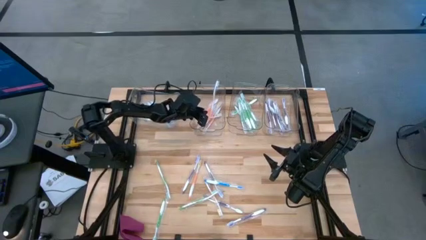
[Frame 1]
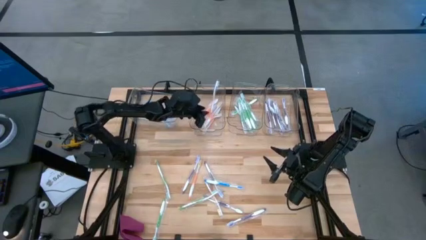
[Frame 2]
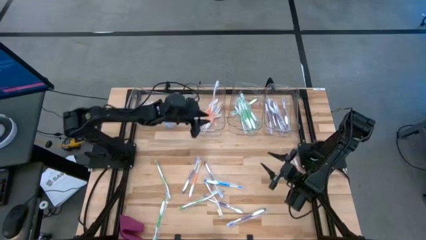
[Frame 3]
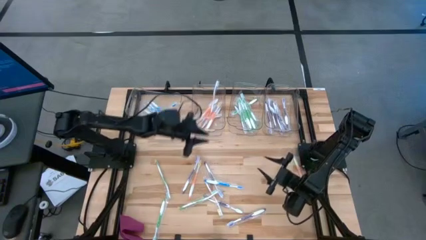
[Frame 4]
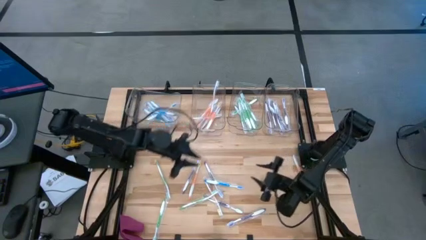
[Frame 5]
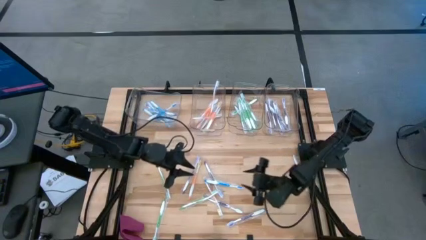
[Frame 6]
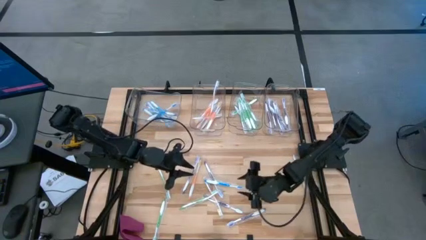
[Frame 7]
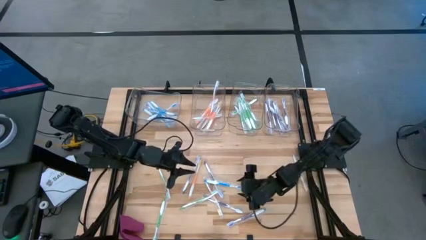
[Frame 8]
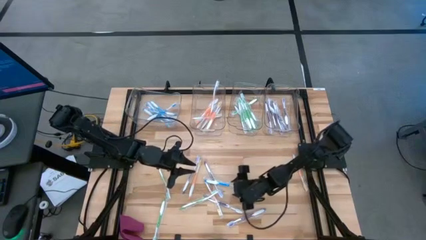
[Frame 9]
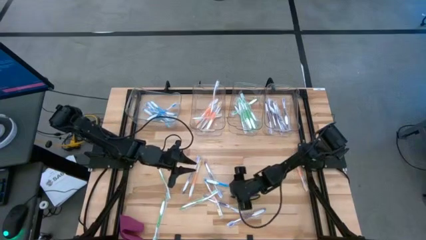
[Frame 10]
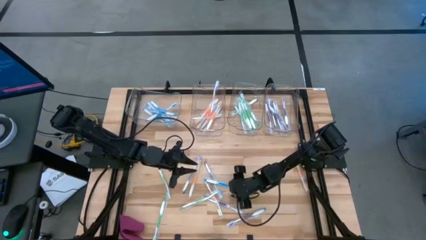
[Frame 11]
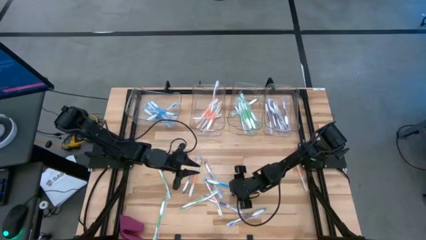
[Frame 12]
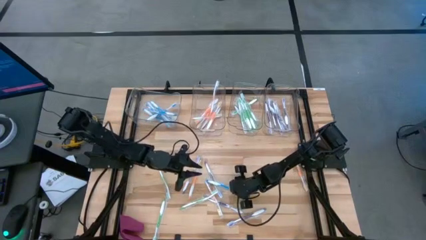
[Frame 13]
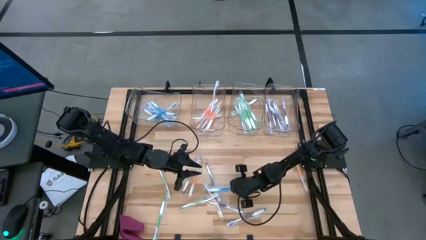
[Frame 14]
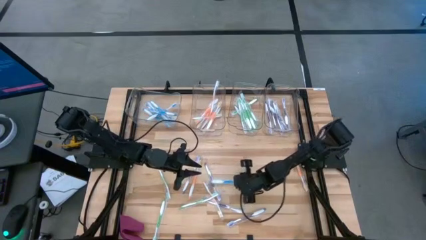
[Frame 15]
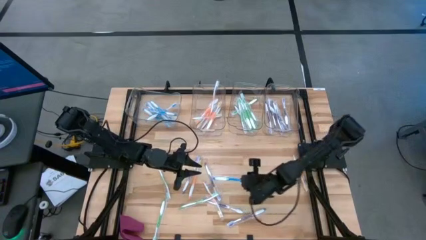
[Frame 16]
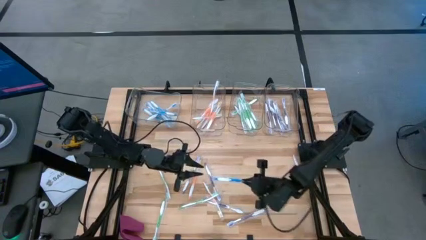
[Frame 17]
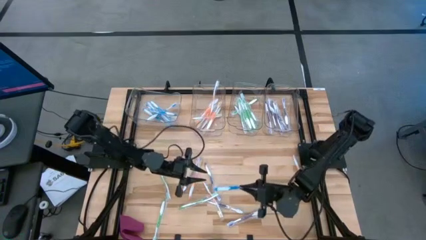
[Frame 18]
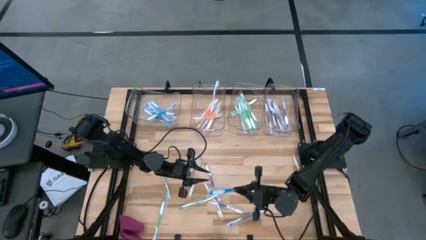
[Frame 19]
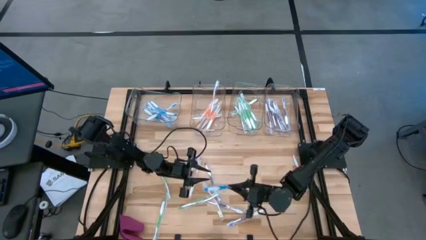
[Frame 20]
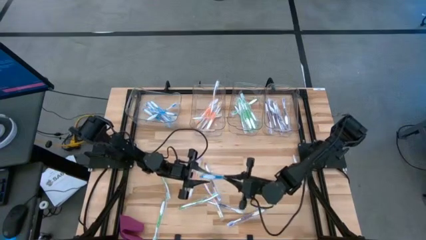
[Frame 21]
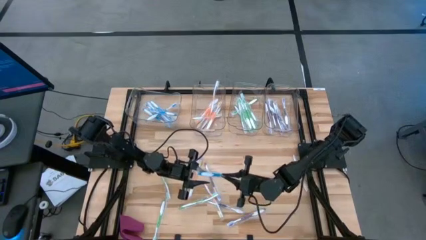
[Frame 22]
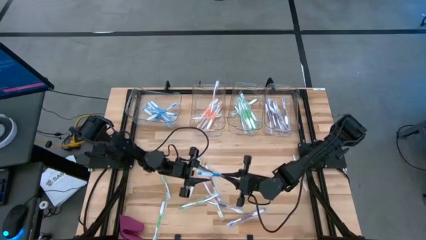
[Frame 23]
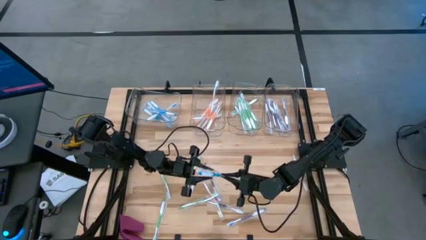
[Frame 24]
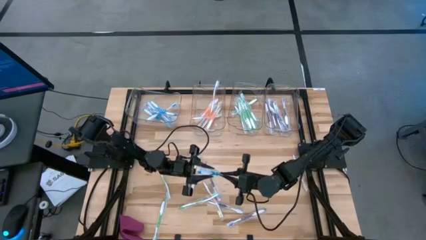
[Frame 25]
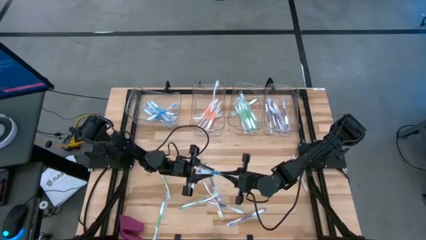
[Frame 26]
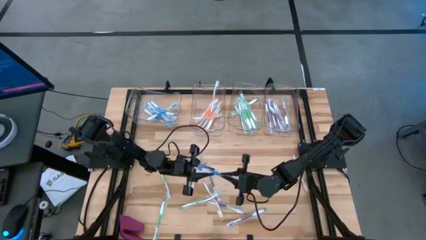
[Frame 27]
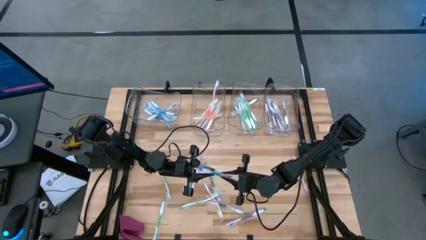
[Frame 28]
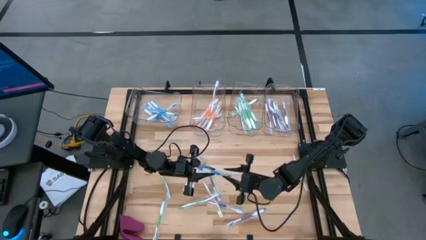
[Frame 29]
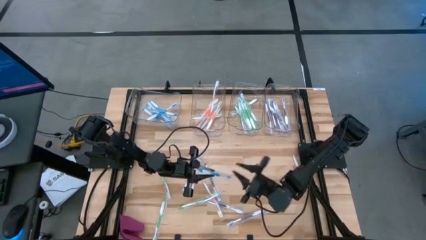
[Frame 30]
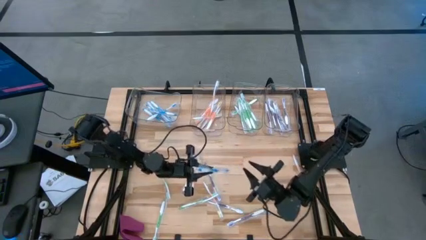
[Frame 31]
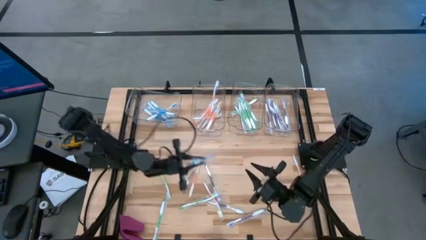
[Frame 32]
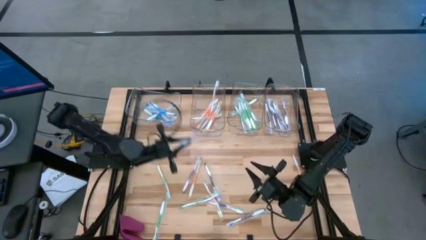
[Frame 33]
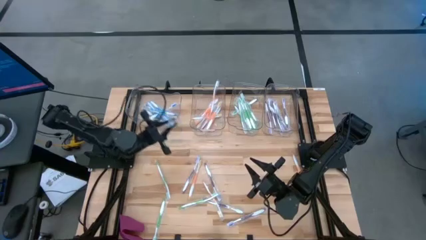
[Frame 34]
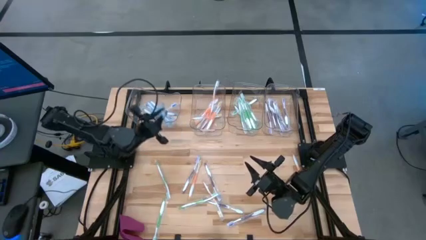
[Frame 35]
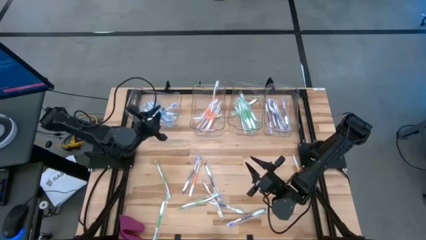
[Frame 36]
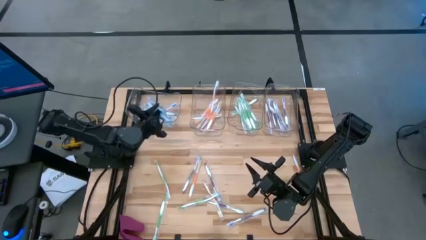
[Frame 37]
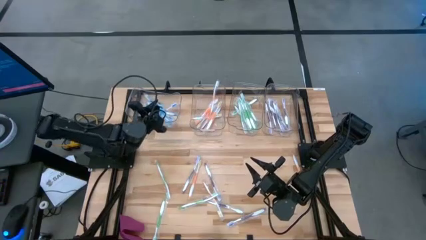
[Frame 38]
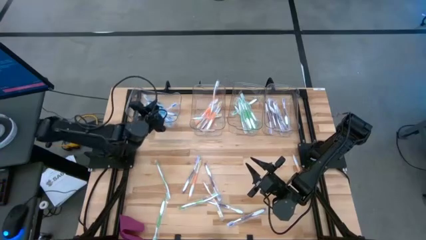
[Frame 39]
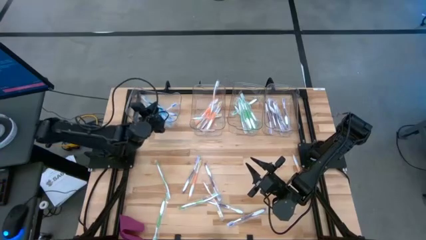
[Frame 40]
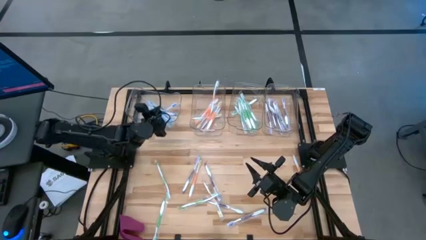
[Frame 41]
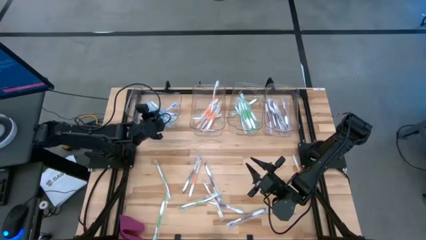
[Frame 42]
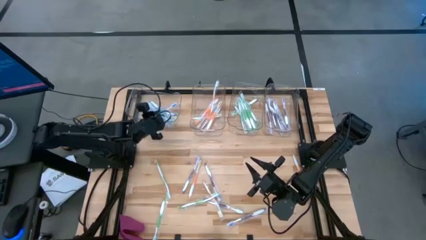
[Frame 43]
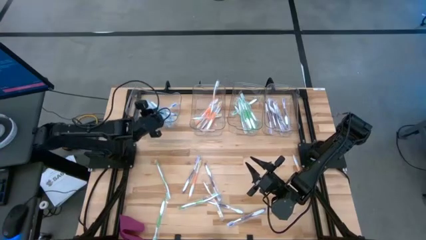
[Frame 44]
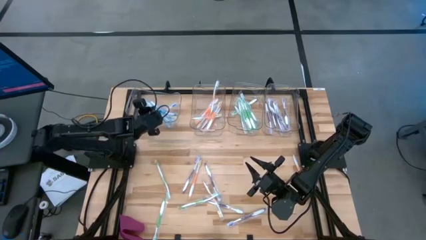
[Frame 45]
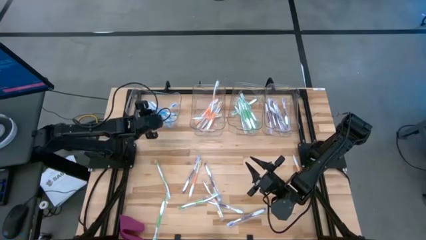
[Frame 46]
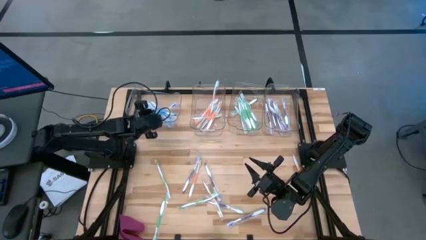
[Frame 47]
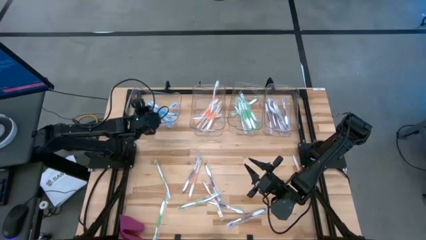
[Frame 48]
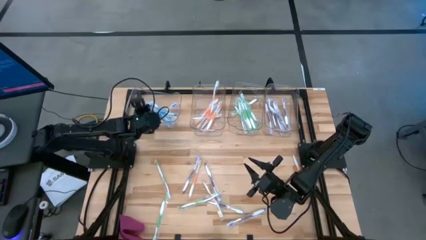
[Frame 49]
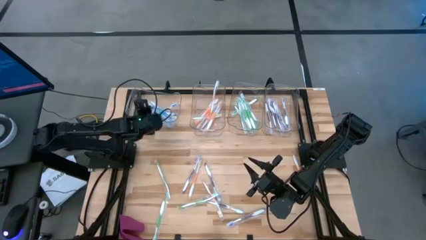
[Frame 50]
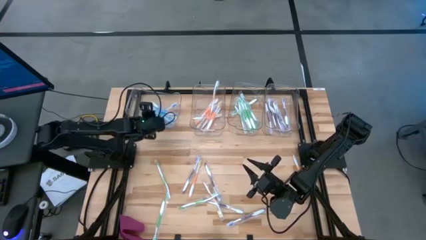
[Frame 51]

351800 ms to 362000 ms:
Task: Pick & Place Toothbrushes
Put the blue toothbrush into the left transparent bin

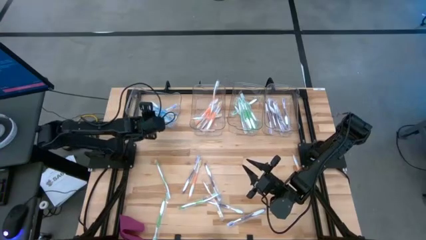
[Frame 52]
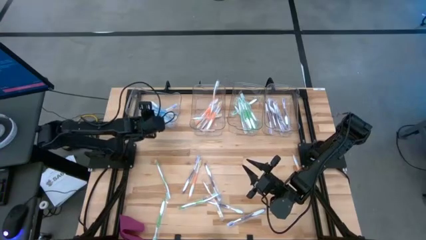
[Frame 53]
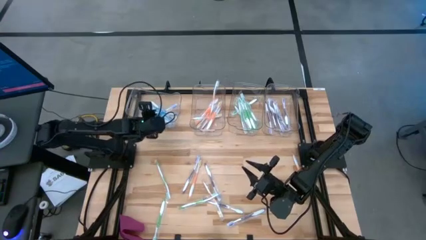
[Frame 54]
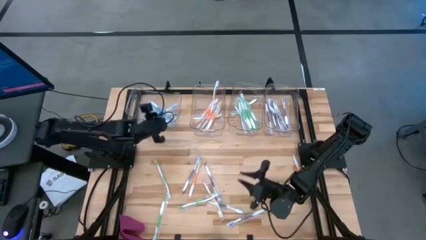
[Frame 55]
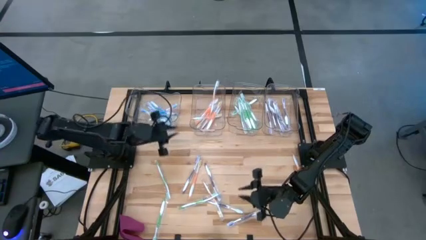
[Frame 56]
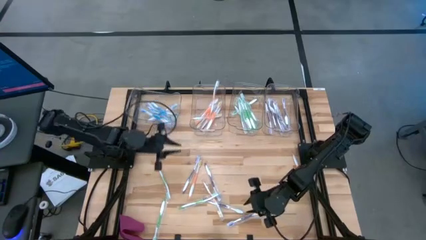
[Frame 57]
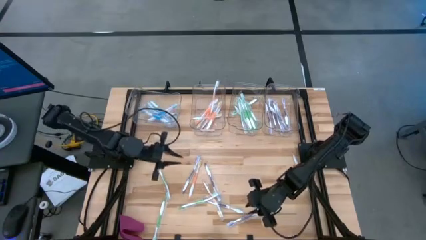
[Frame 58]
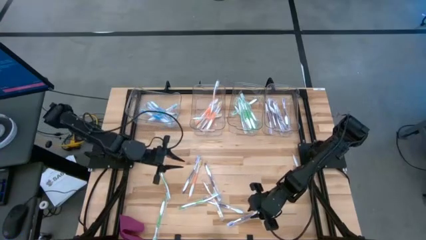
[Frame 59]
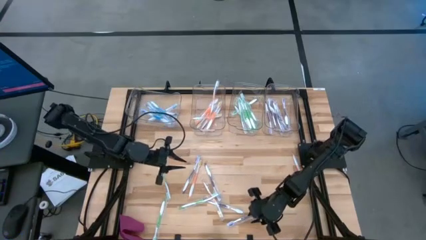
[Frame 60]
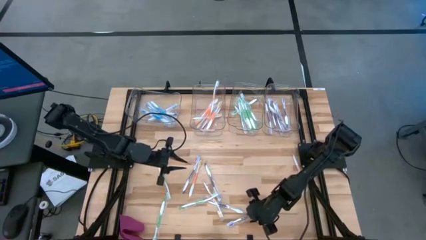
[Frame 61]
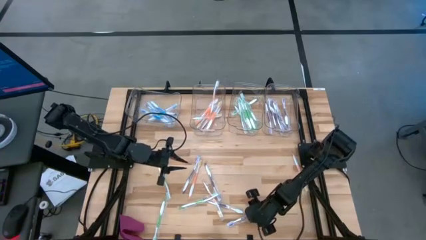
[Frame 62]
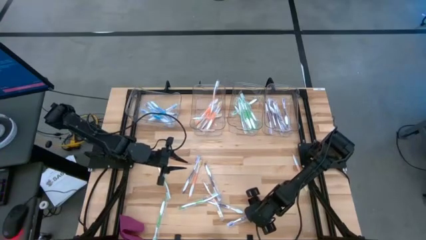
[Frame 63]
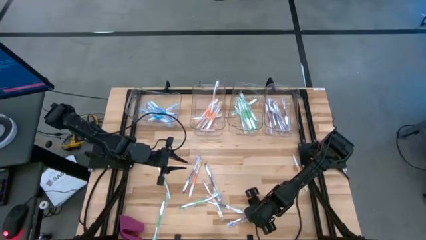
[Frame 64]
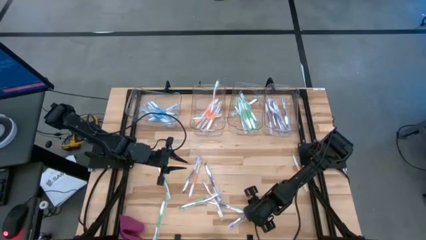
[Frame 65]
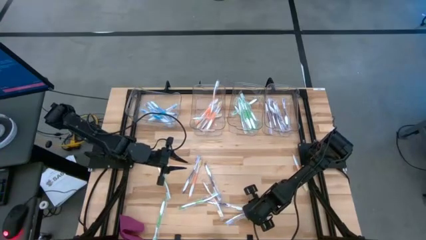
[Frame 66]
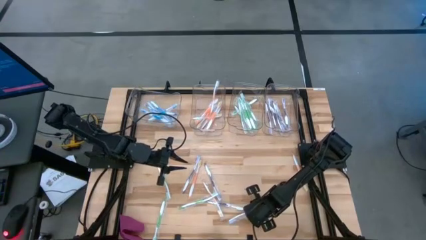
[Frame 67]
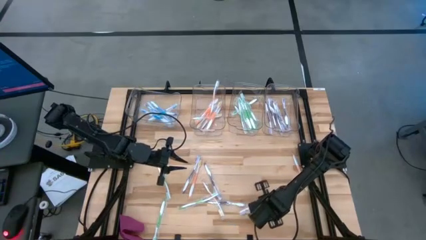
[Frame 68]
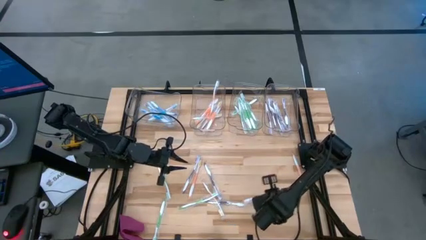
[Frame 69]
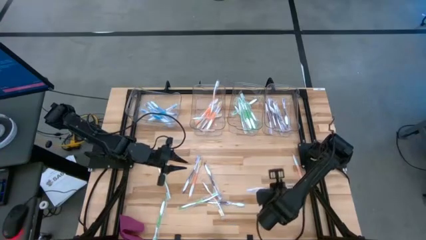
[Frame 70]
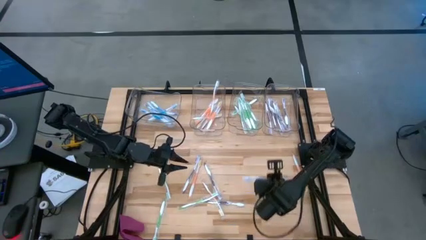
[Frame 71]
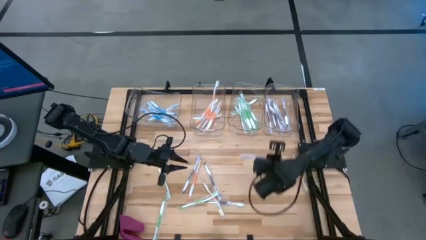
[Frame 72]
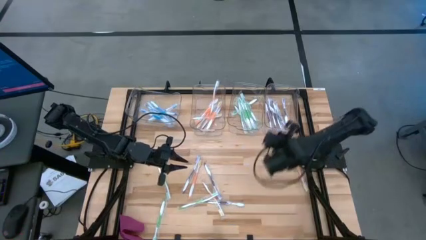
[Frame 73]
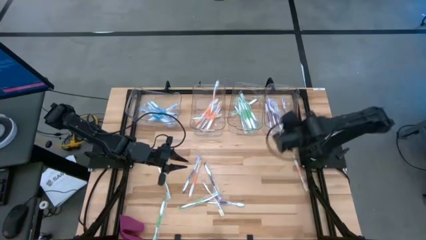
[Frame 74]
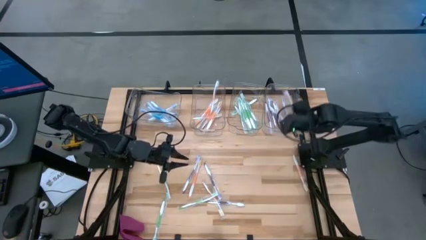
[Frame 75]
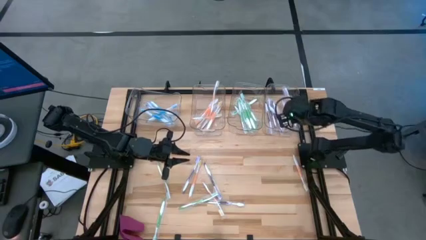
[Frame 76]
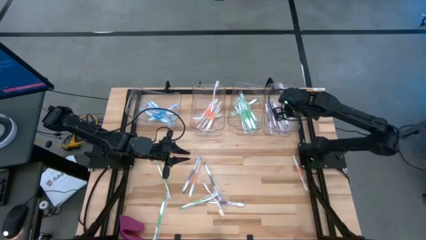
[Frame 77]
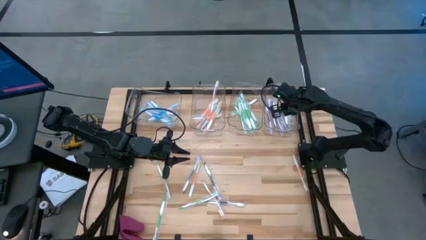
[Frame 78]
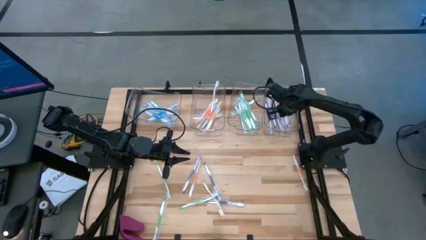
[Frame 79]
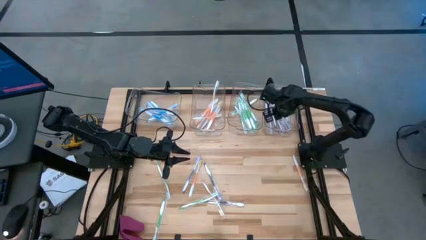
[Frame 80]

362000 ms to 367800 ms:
Put the violet toothbrush into the right transparent bin

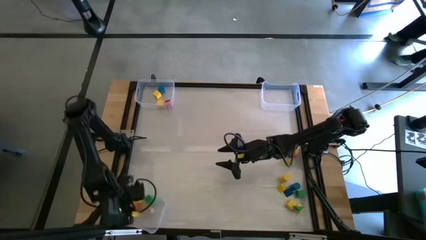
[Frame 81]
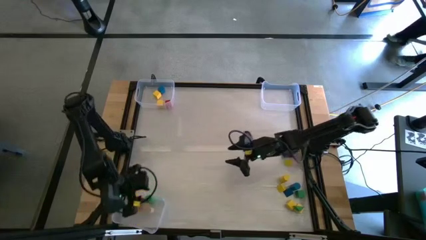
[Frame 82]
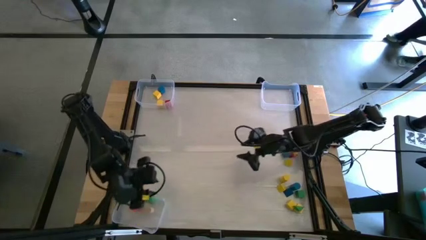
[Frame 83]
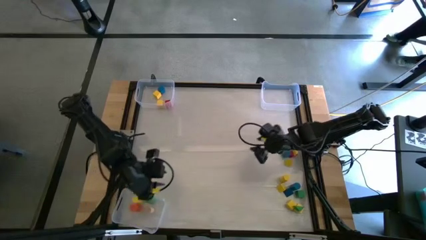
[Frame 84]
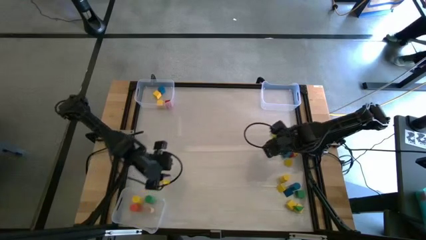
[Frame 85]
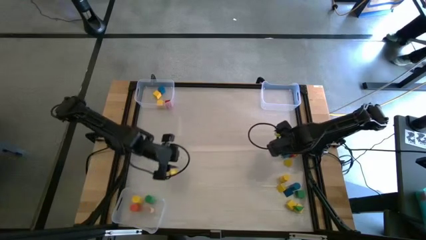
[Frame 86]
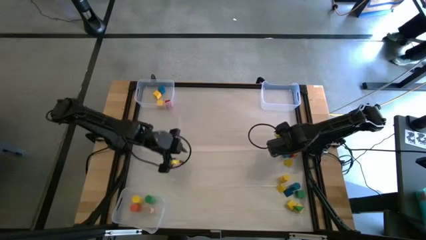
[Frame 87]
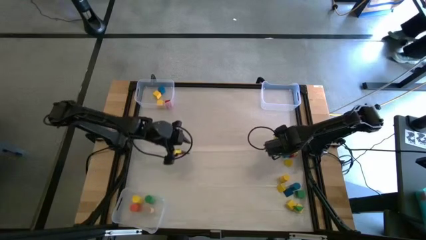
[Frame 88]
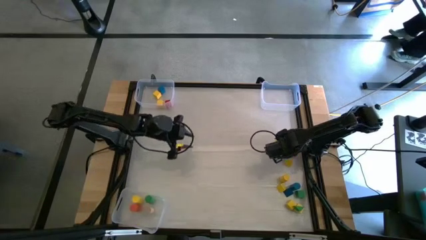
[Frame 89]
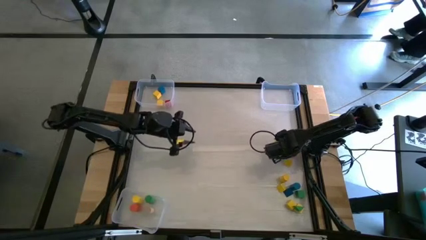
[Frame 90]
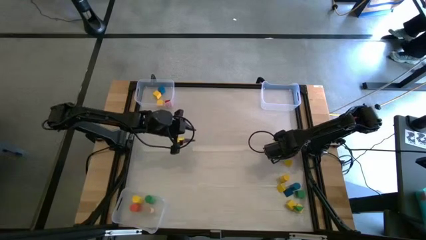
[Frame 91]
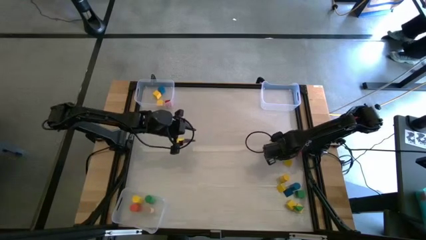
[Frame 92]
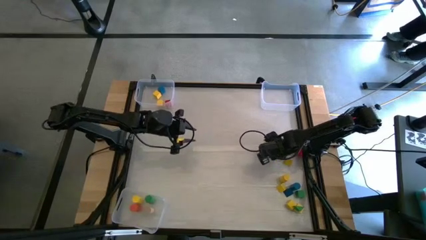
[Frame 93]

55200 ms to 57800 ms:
Task: Sort blocks by size
Put the right blue cube block into the top left transparent bin
